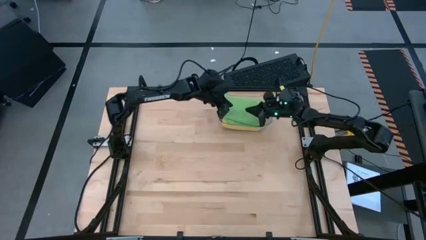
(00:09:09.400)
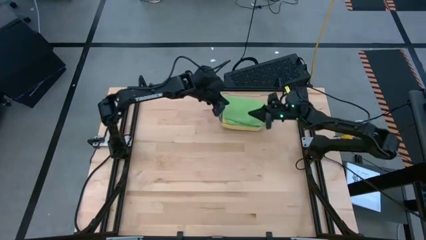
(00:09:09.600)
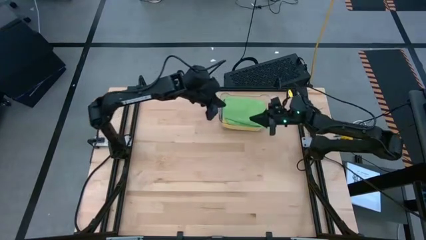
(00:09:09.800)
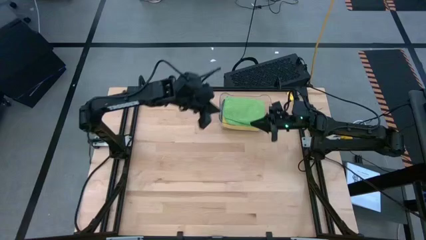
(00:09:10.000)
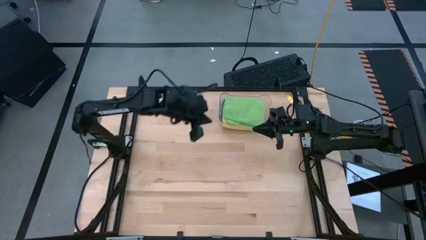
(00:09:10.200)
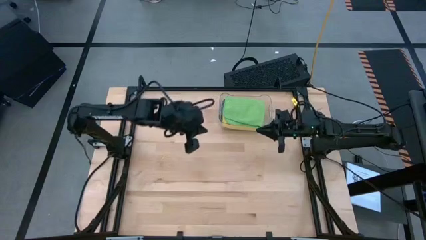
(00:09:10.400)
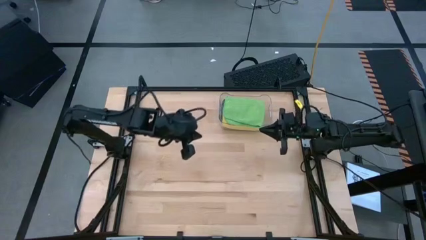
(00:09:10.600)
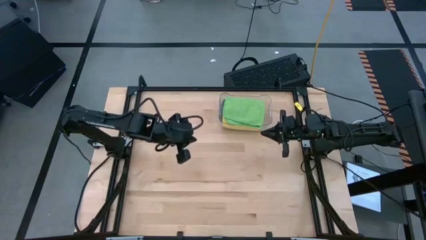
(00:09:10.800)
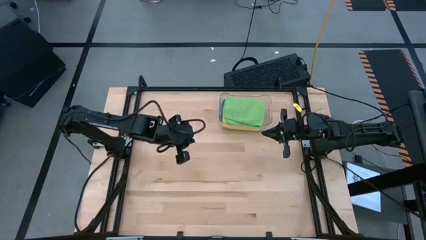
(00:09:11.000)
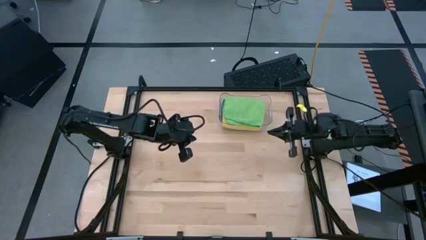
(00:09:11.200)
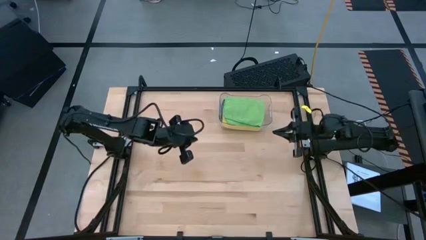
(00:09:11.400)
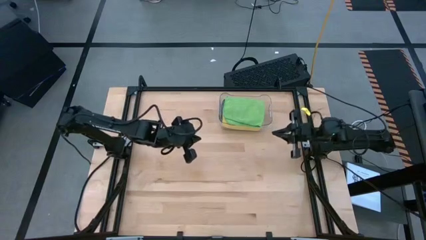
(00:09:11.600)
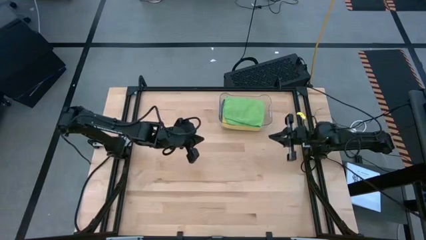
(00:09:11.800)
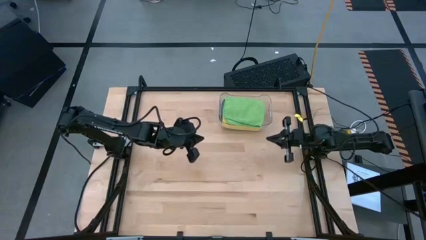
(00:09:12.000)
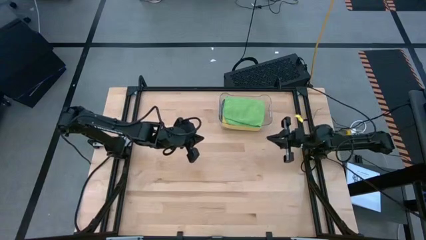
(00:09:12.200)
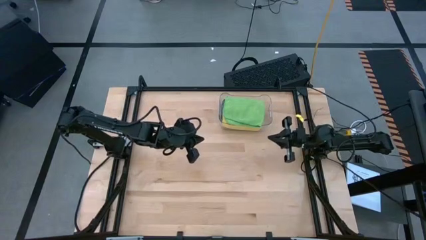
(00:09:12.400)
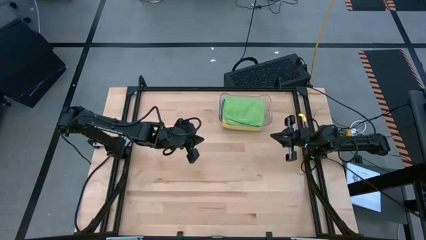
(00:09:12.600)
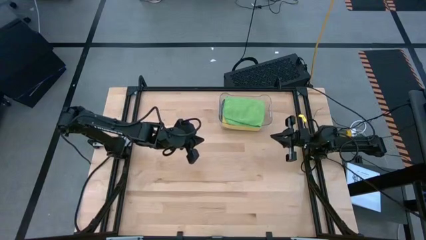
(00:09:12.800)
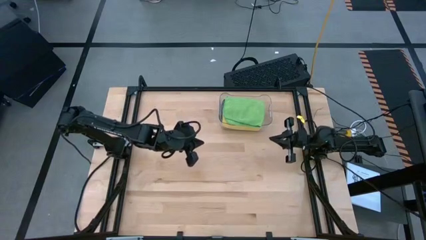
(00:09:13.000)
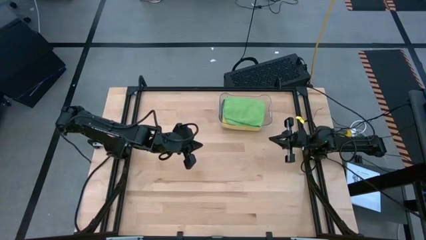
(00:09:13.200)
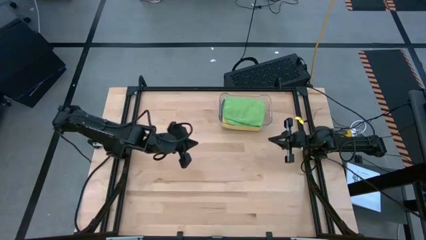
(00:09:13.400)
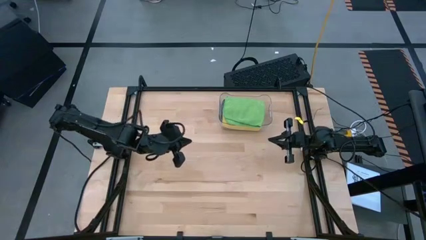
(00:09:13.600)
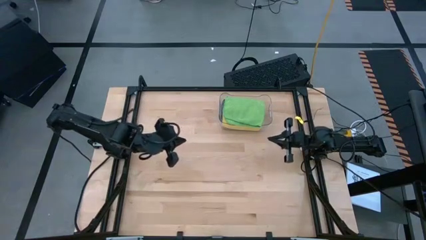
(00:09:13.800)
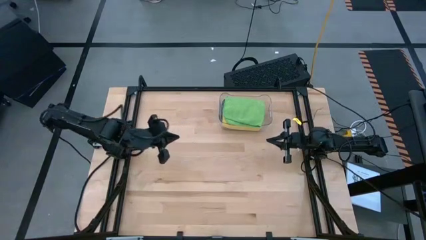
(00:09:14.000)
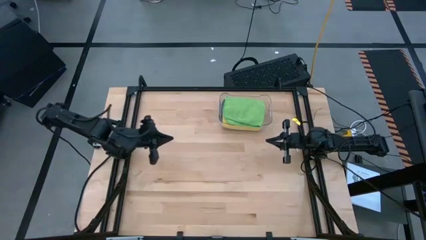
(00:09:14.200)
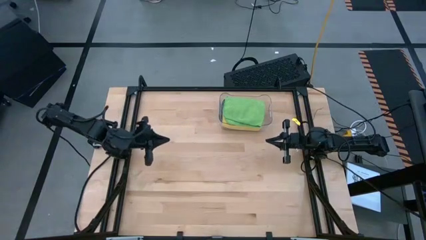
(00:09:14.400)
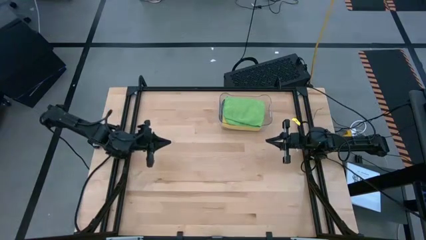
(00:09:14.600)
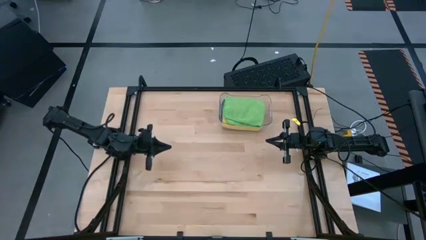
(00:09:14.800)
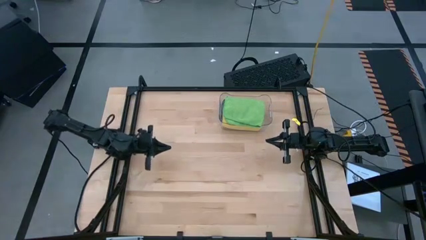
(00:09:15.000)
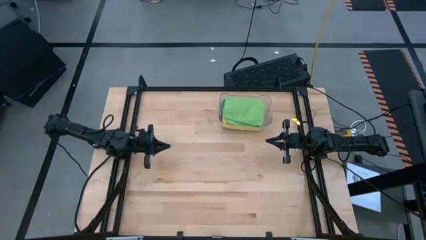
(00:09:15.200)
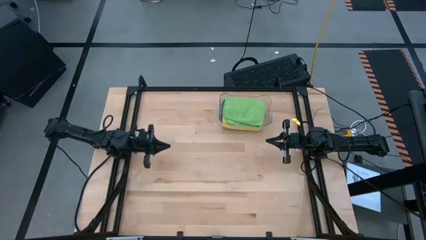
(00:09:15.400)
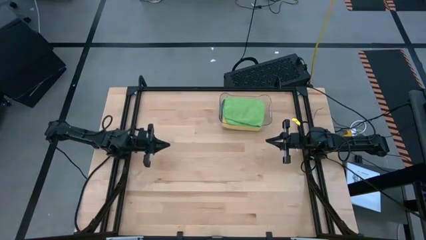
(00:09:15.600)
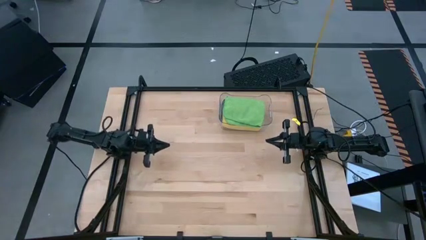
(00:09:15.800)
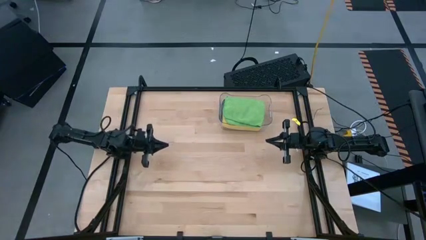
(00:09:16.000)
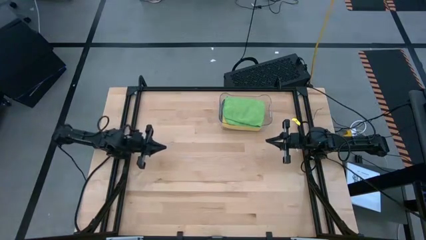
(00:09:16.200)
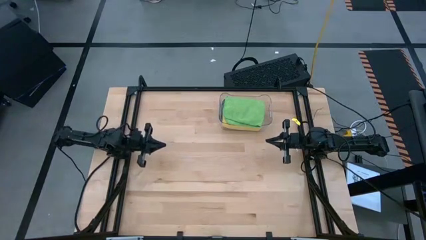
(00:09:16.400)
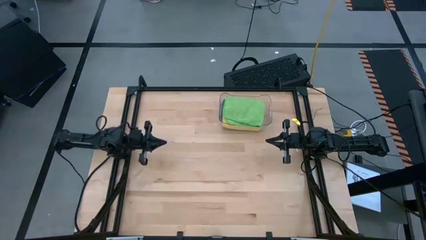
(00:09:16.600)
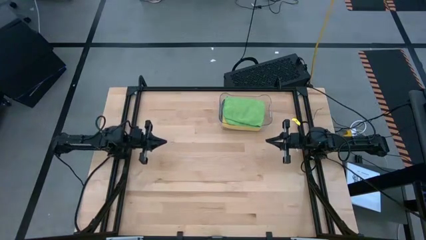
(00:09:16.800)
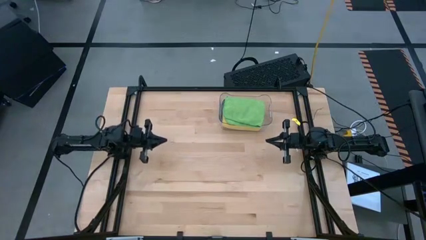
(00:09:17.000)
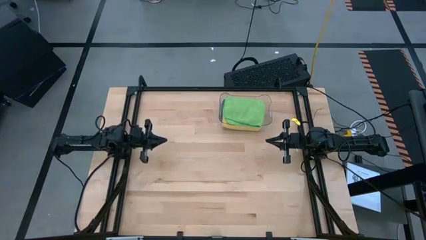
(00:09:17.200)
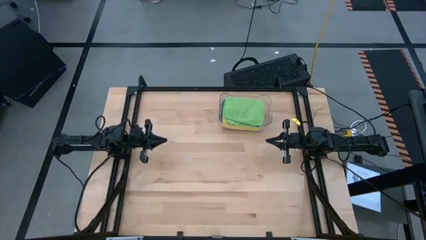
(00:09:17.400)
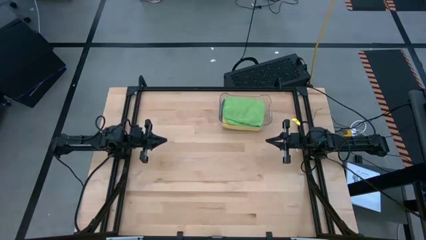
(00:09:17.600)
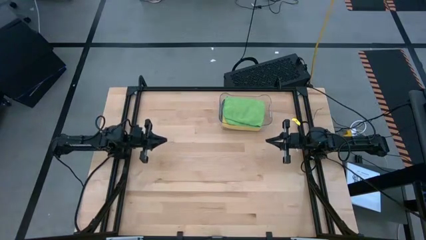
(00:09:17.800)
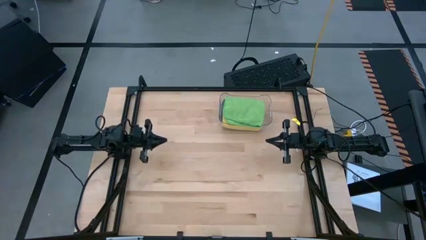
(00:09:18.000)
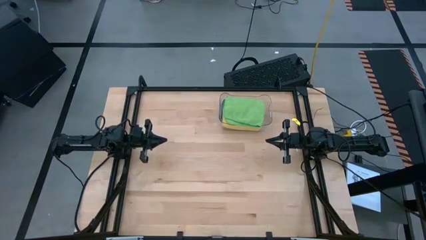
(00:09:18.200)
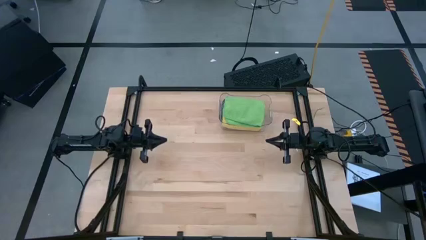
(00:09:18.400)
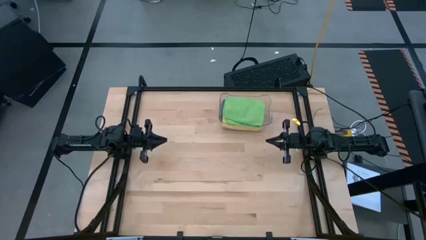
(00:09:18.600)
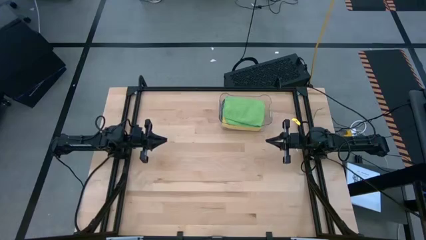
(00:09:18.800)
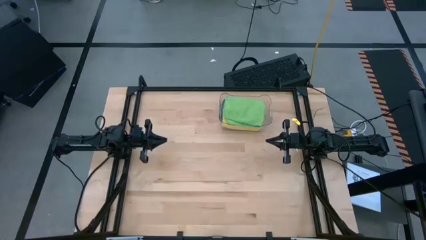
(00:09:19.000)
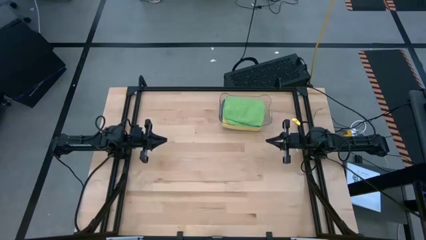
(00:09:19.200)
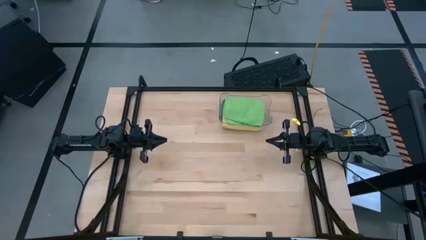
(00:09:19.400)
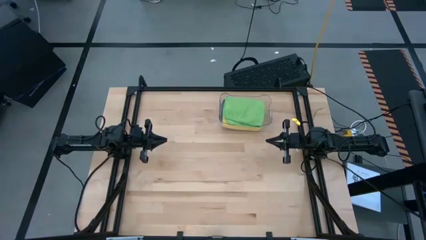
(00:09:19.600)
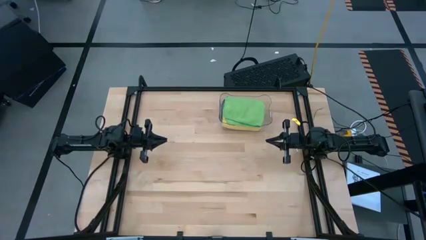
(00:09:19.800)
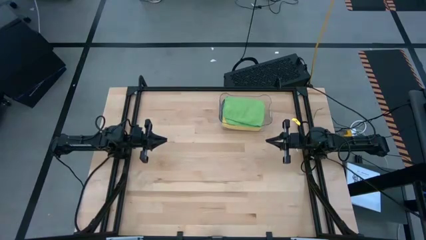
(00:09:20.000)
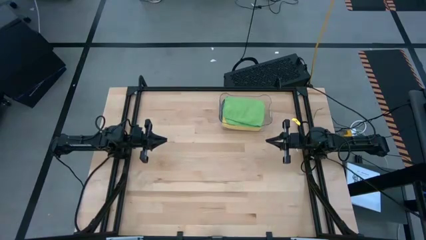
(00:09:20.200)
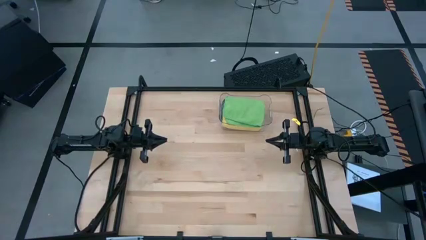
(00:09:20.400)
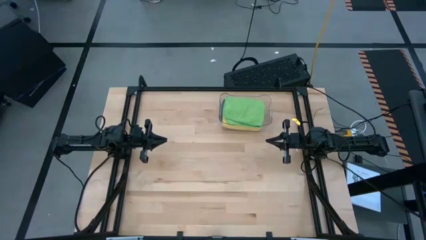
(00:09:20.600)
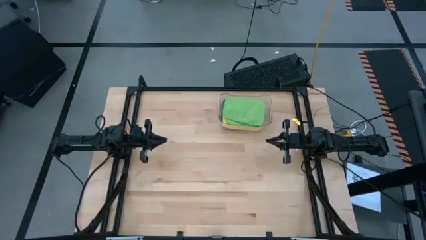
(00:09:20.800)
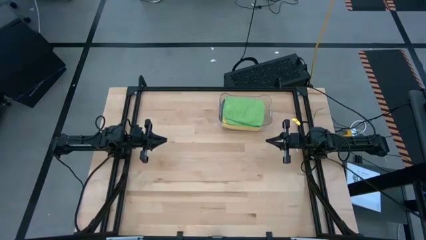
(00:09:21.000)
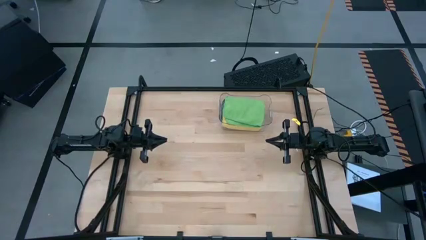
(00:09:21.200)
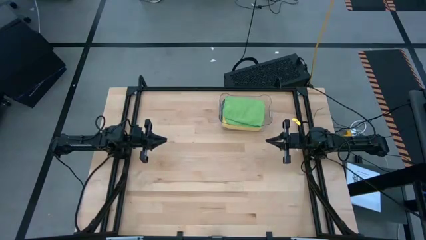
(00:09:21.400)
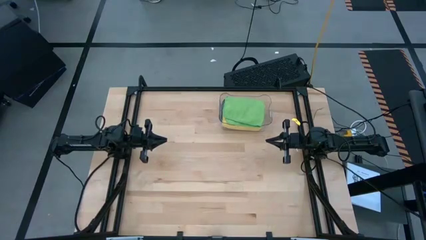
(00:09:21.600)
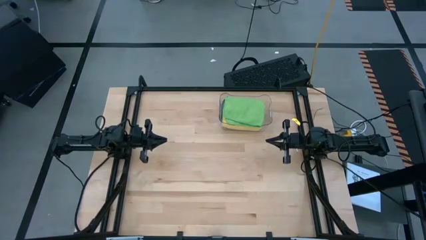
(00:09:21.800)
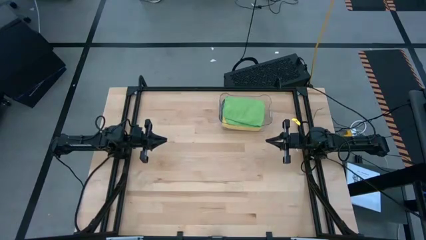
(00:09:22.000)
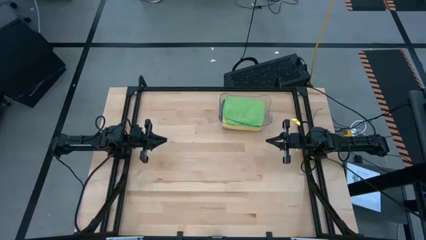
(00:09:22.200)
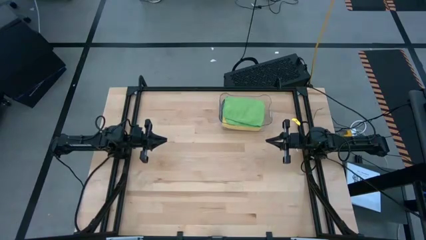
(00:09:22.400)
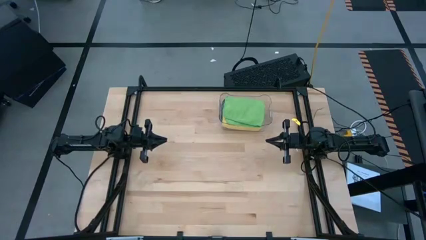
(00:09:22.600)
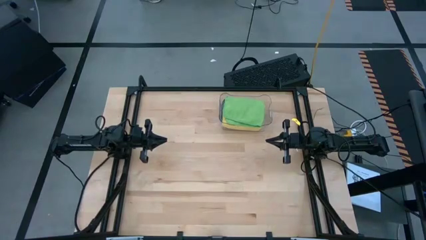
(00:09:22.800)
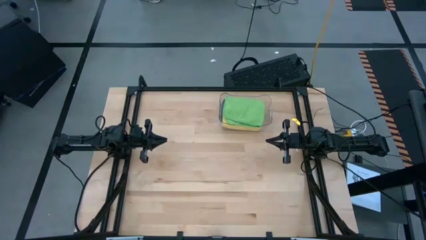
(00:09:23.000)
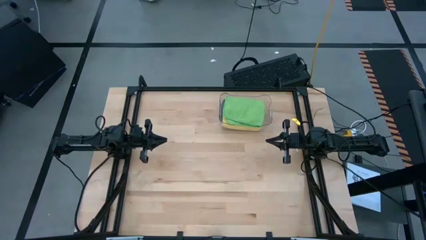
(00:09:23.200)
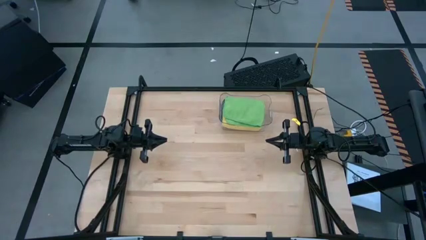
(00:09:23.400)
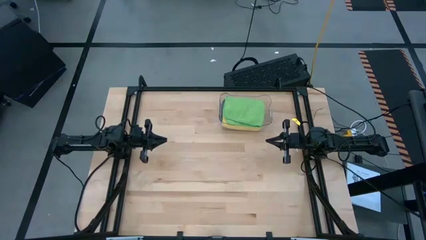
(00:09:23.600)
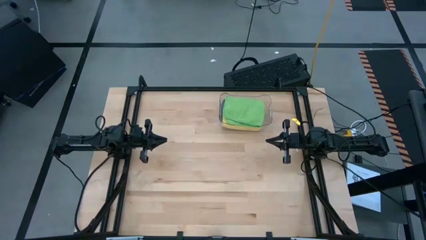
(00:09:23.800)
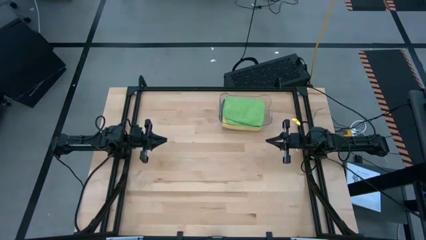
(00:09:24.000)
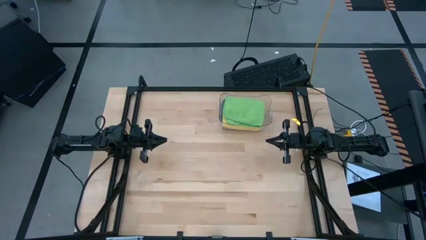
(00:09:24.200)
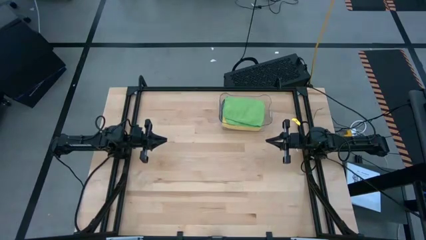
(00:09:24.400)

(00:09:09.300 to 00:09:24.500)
Task: Fold microfiber towels
Return to Home Position
